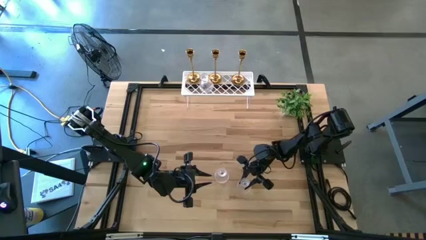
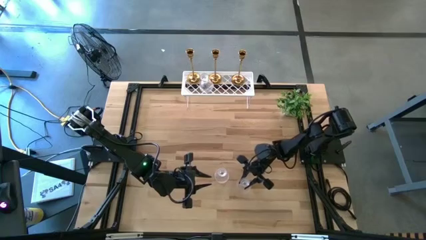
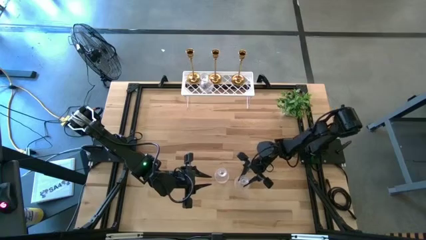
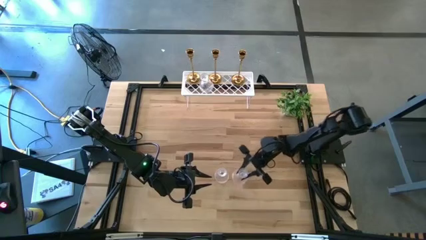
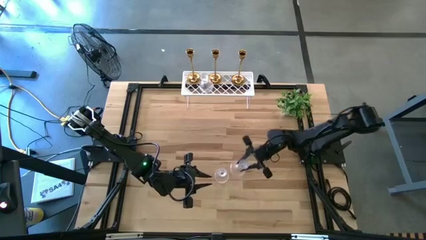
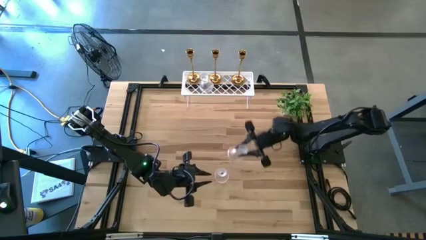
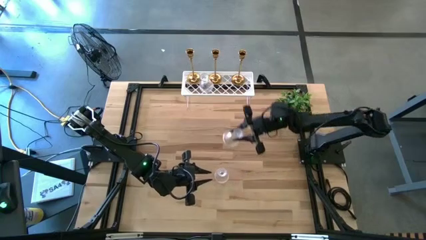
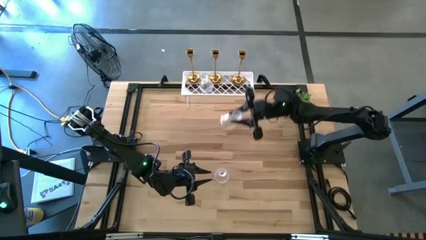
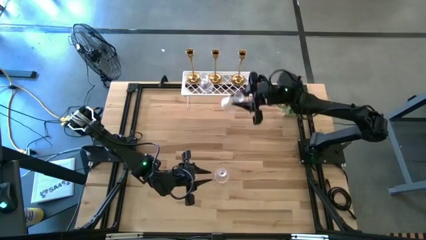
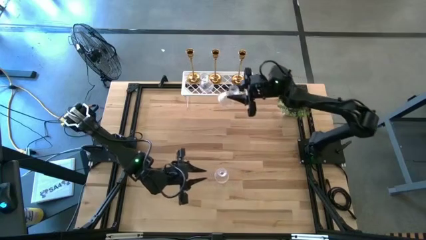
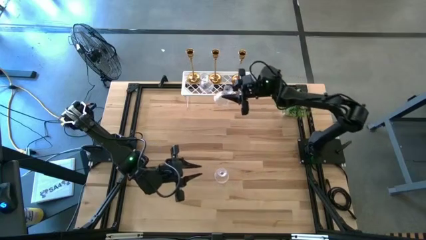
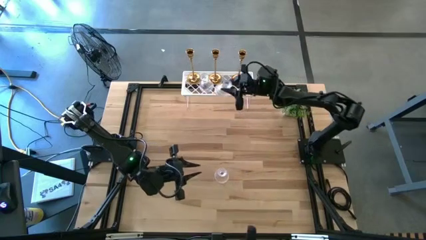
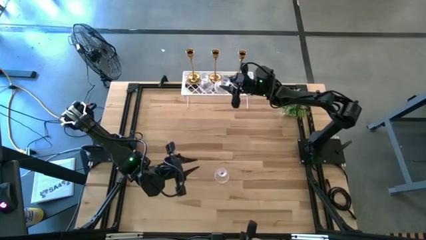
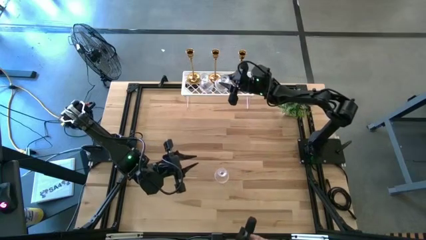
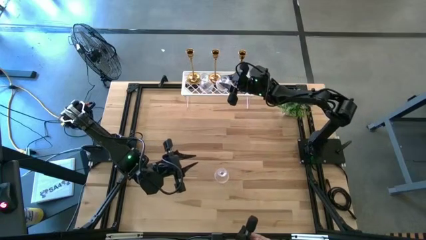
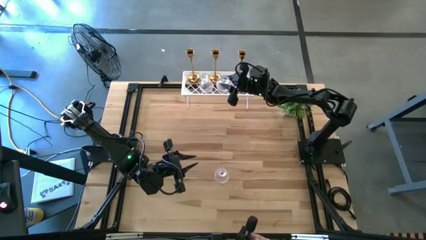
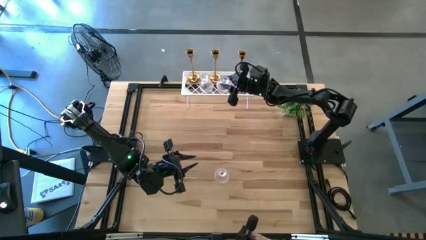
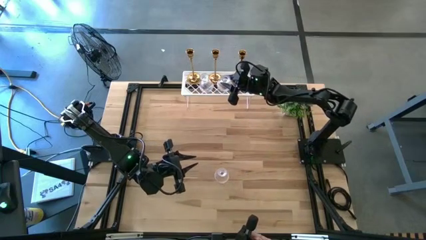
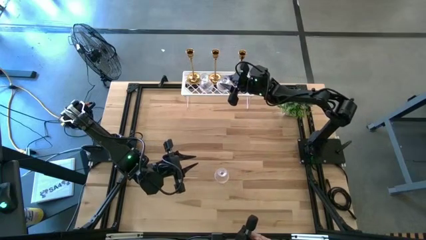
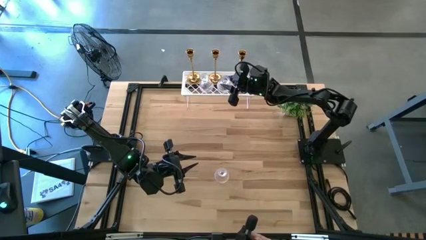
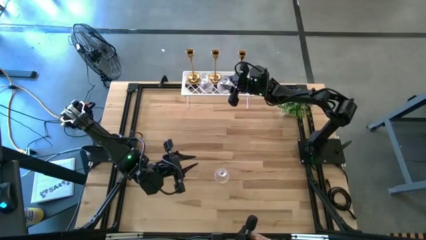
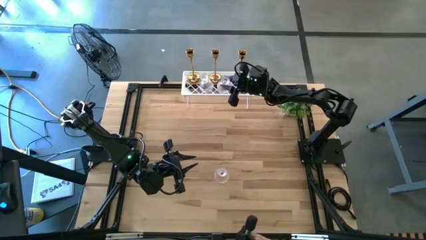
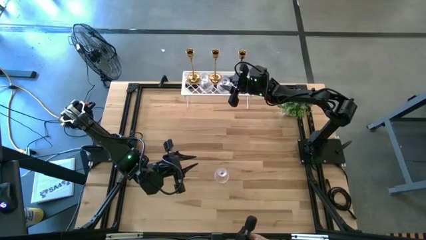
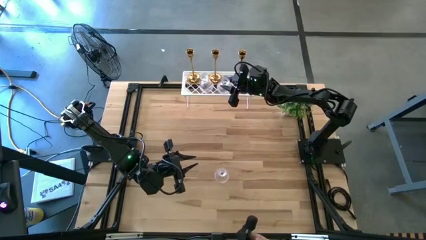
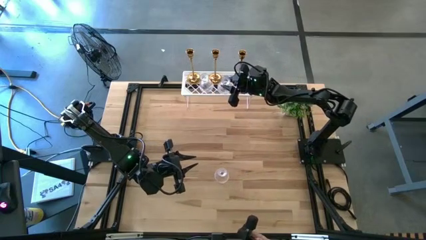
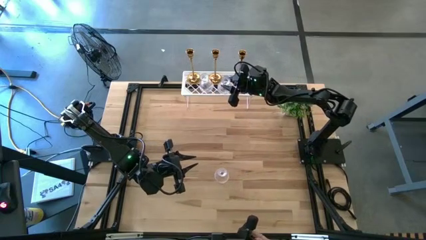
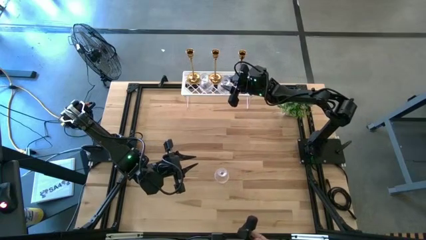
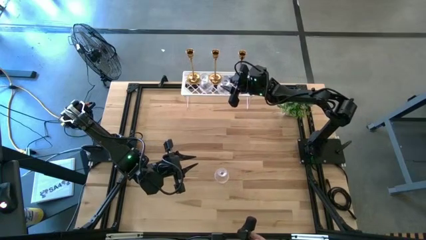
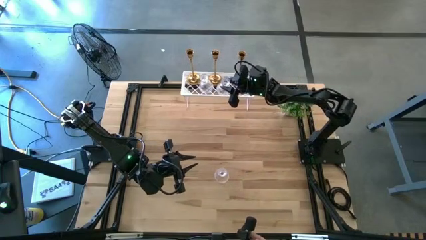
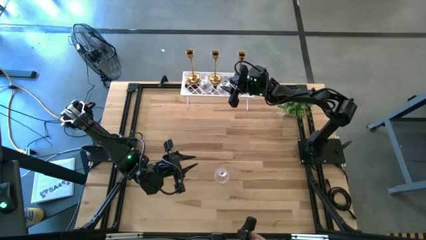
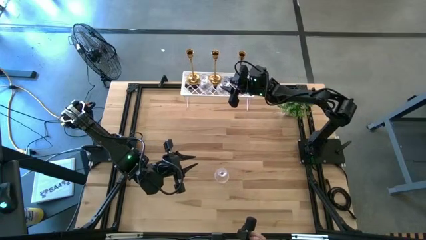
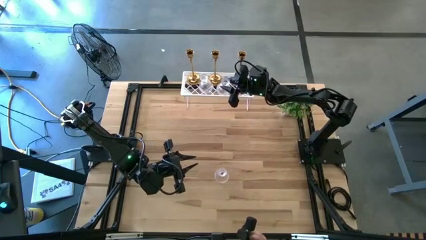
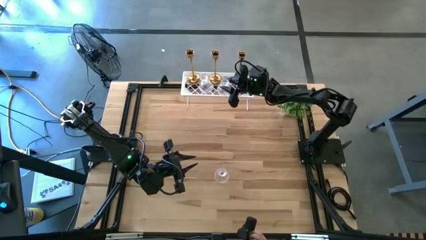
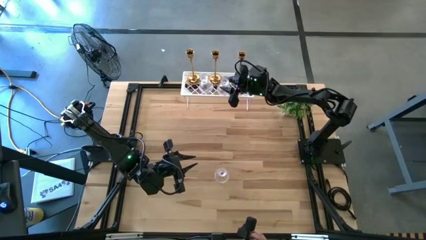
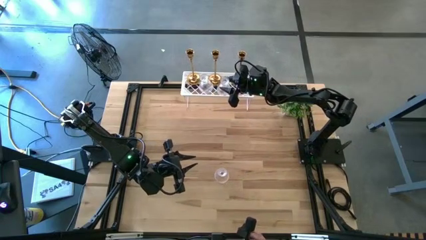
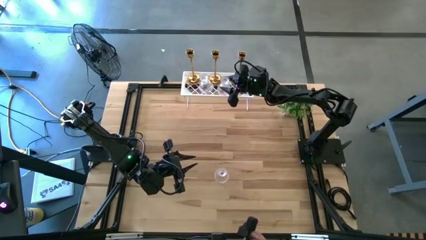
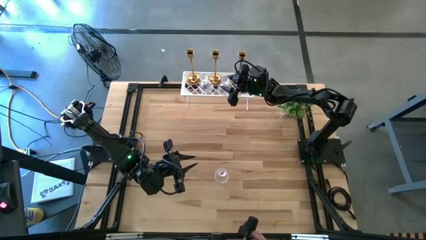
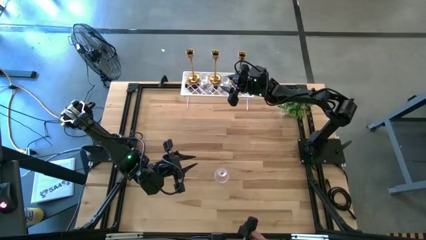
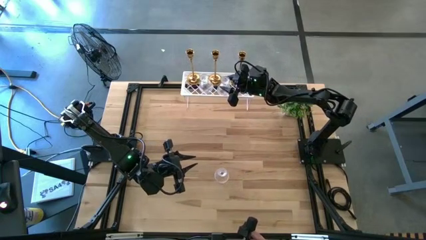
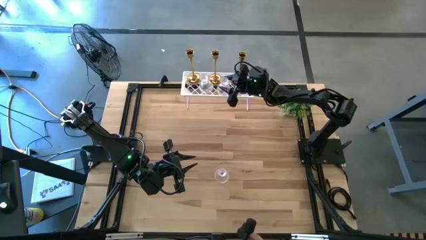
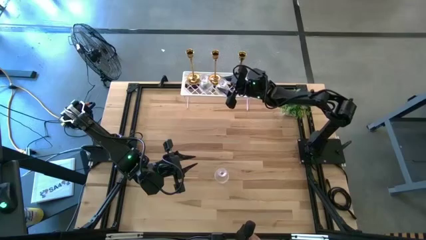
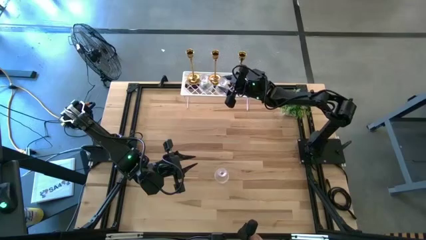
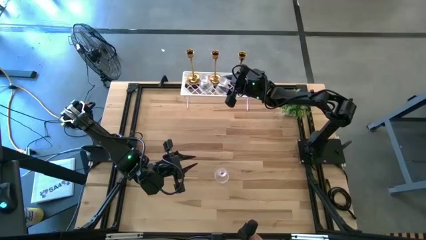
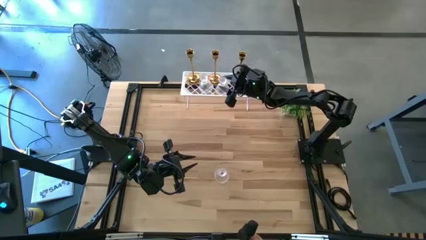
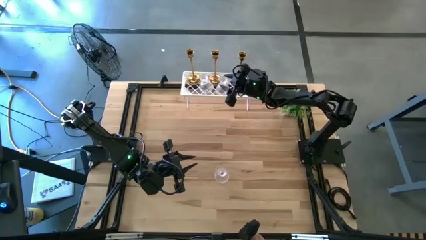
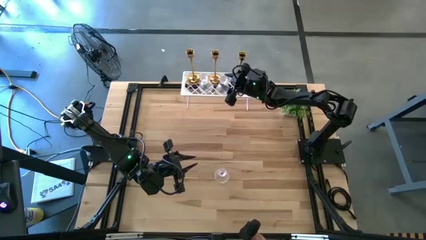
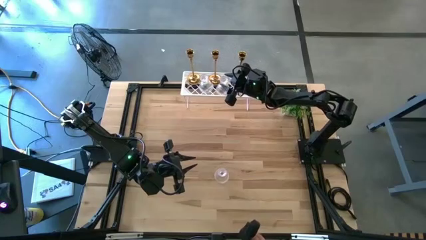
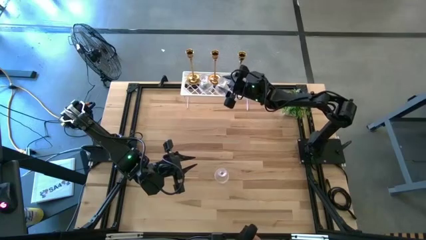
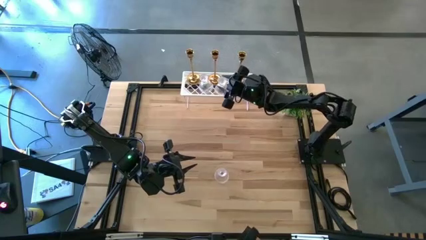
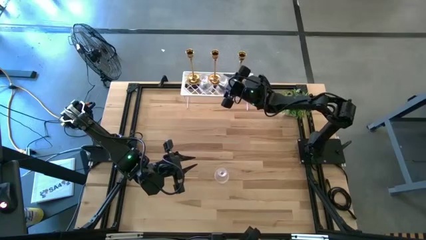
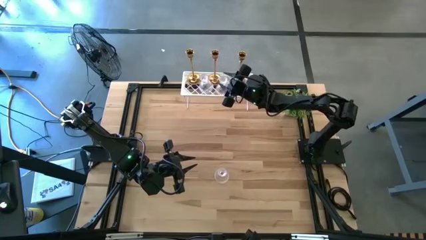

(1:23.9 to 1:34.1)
Task: Pick & Place candle stick holders
Put the right glass candle holder on the shelf

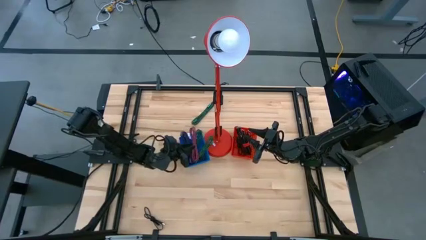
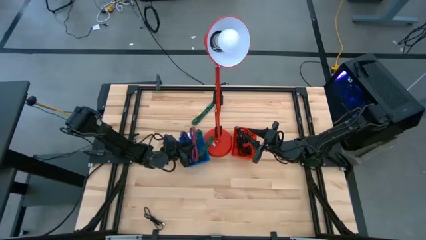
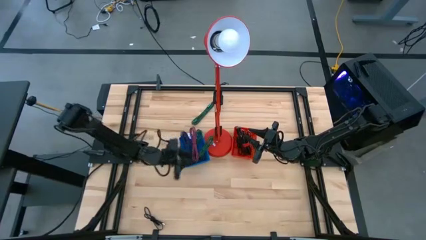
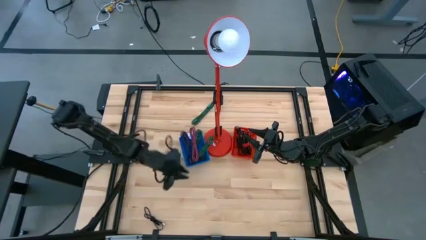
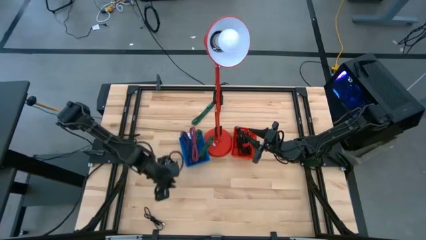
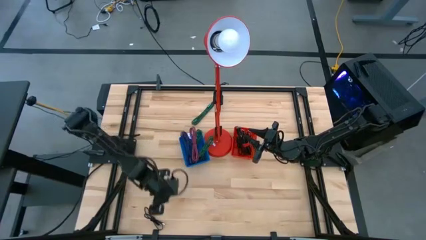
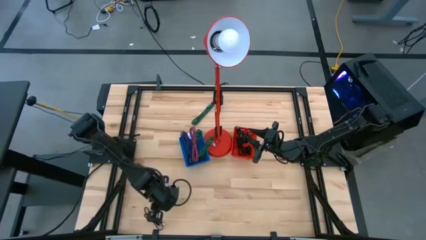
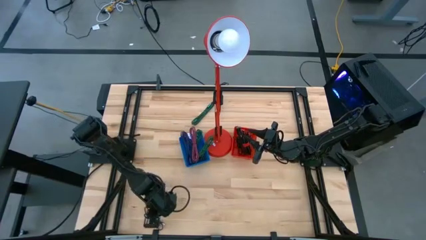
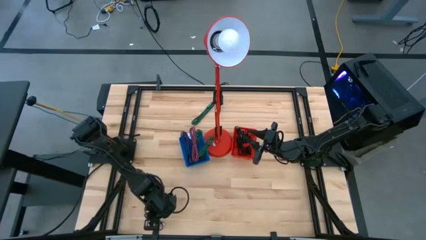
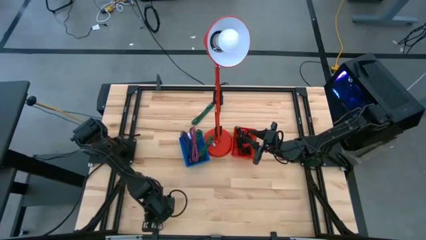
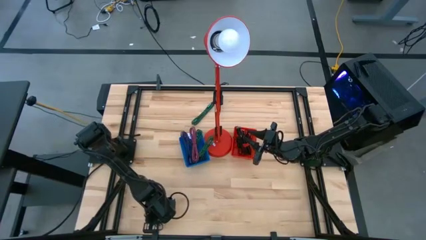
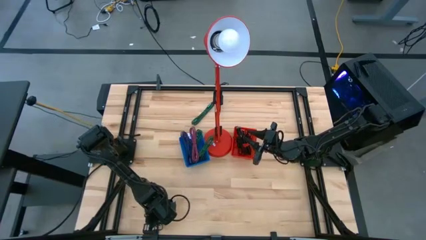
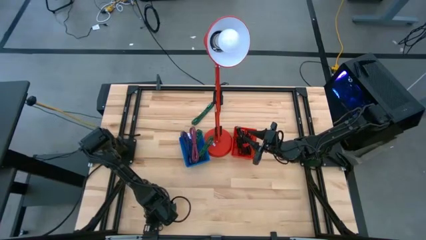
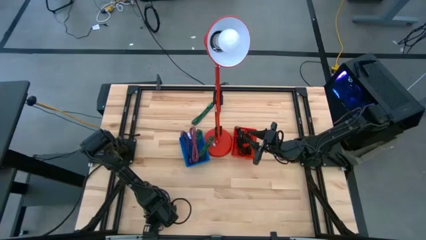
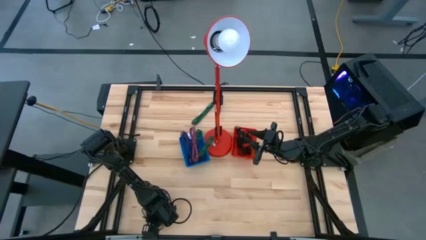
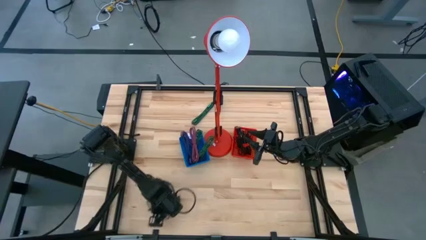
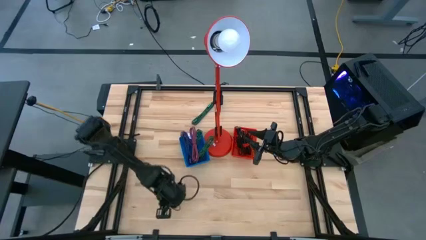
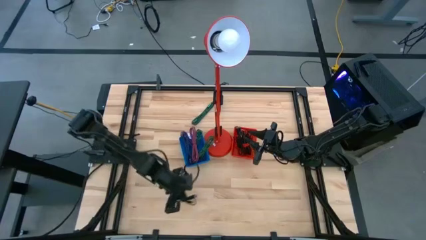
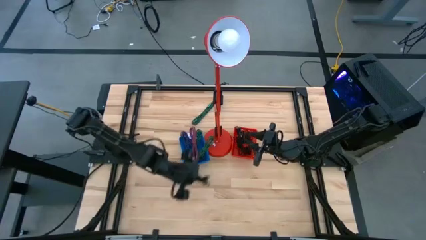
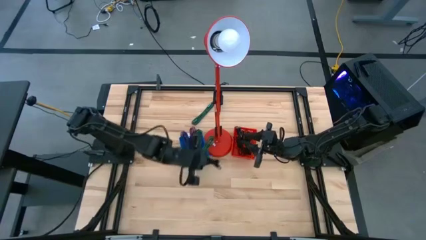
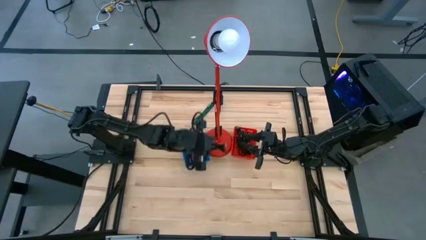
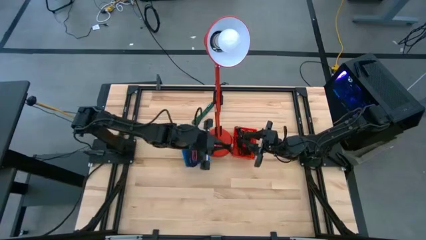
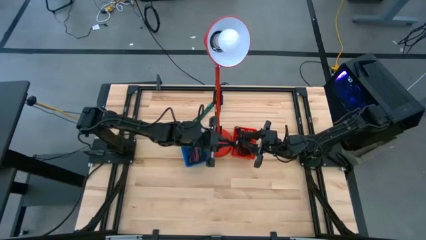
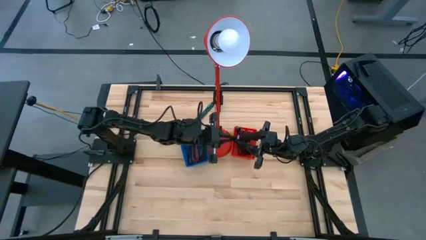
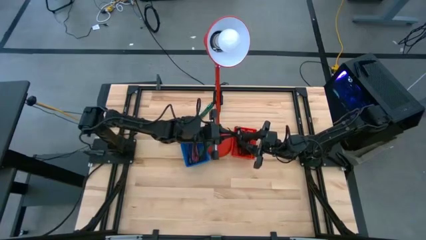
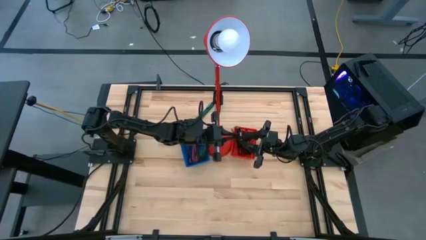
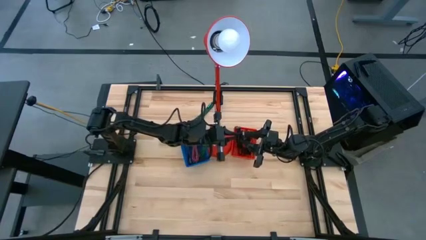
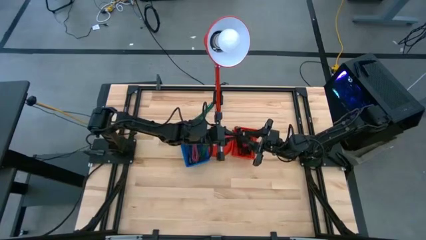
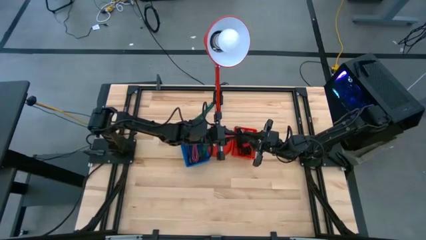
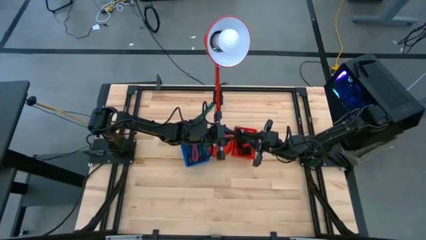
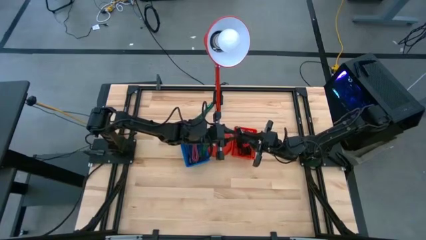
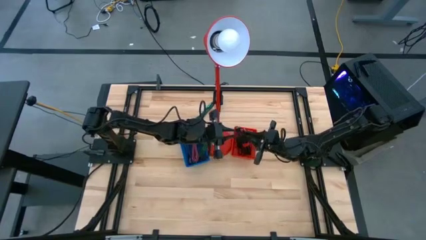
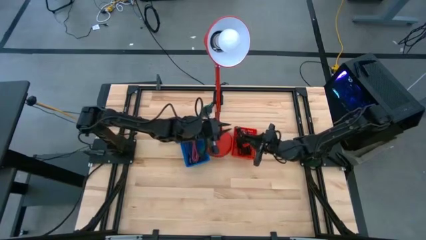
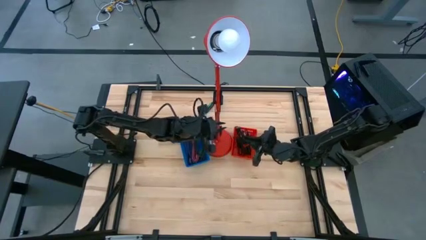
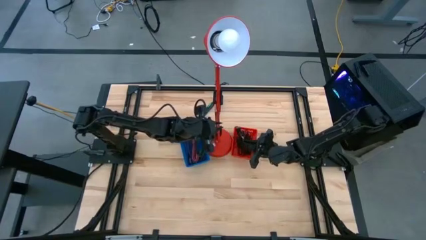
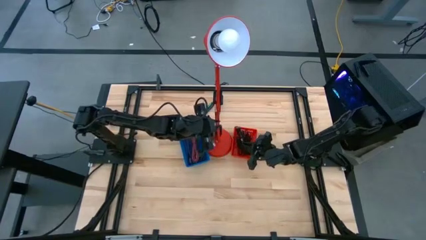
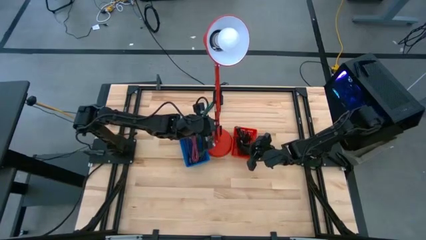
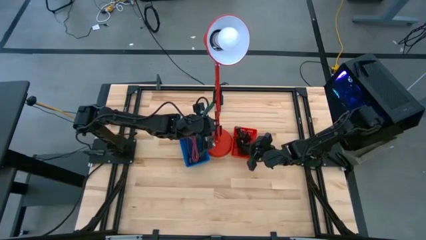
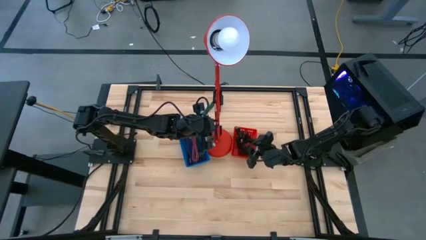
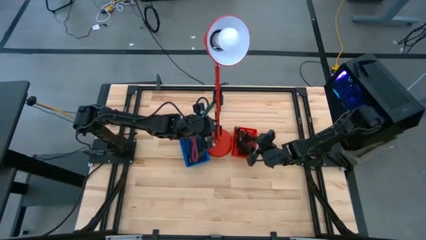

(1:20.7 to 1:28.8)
Task: Pick & Place USB Port
Put the black charger cable into the orange bin
